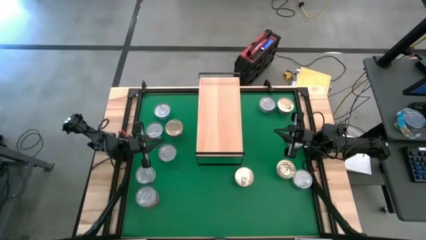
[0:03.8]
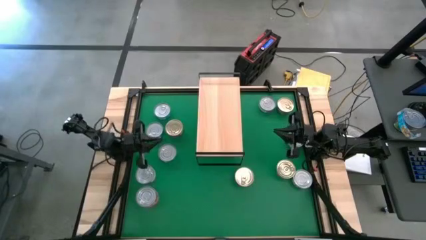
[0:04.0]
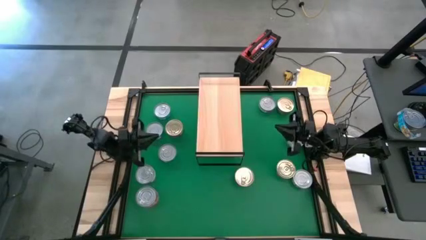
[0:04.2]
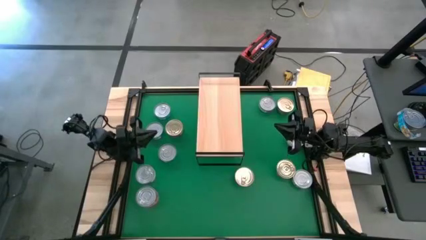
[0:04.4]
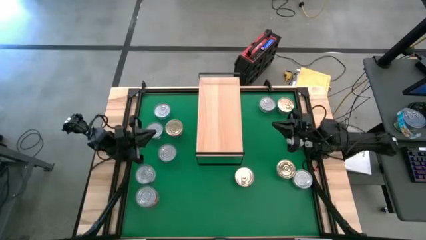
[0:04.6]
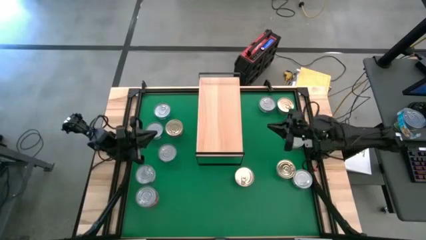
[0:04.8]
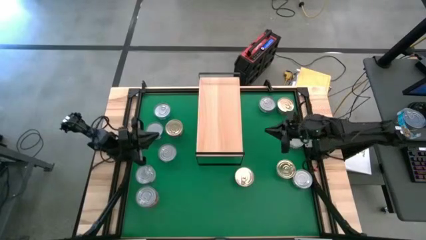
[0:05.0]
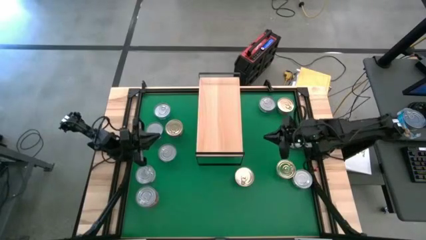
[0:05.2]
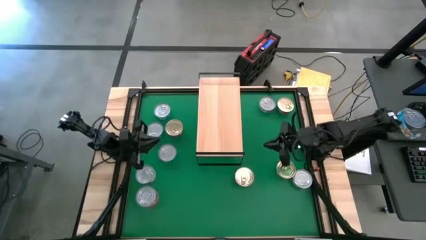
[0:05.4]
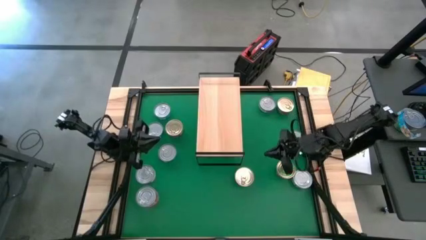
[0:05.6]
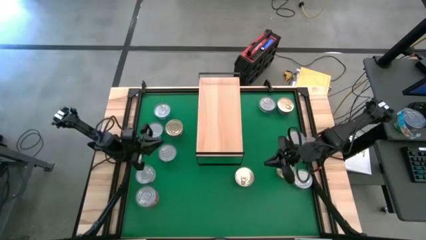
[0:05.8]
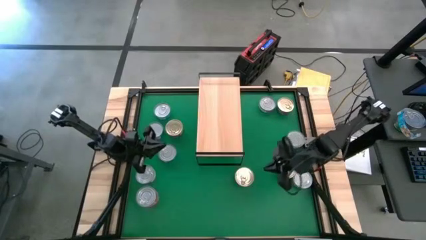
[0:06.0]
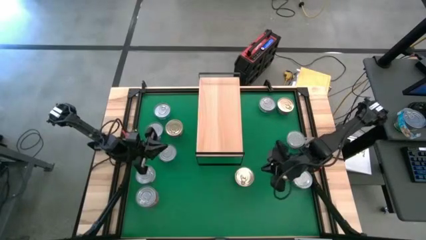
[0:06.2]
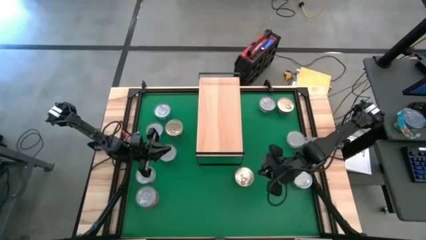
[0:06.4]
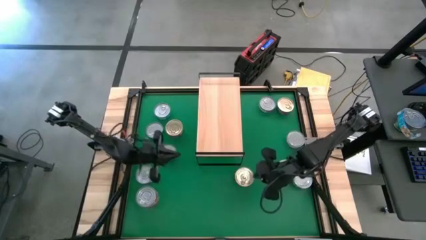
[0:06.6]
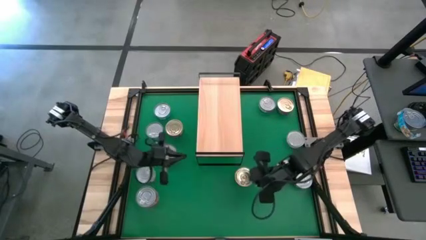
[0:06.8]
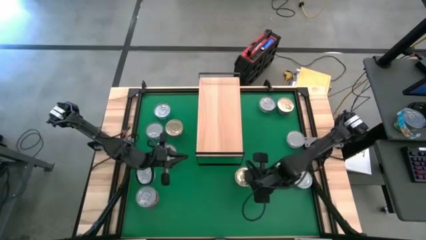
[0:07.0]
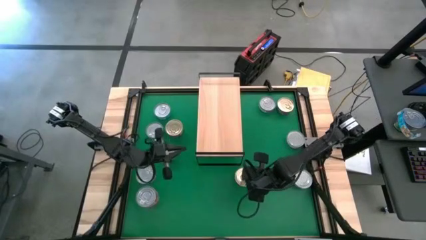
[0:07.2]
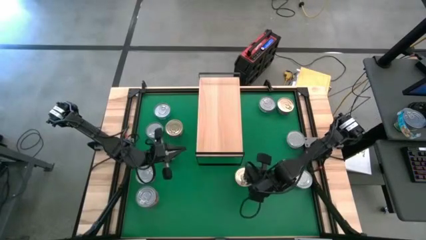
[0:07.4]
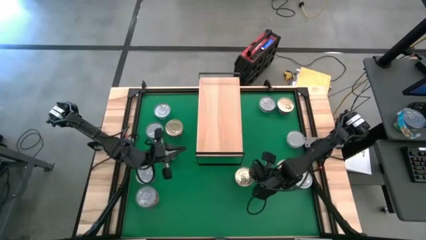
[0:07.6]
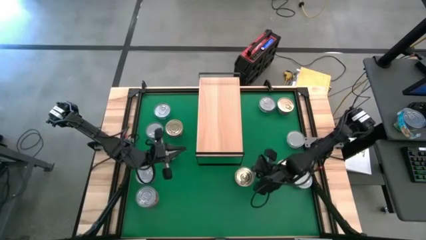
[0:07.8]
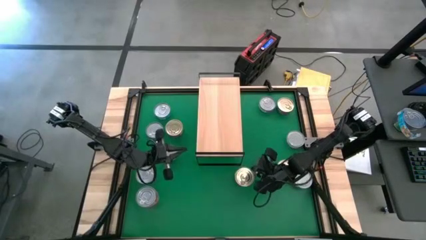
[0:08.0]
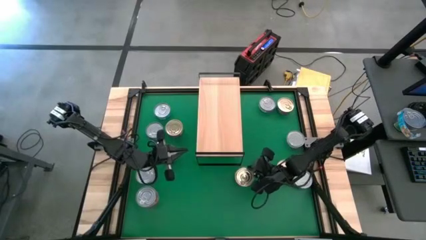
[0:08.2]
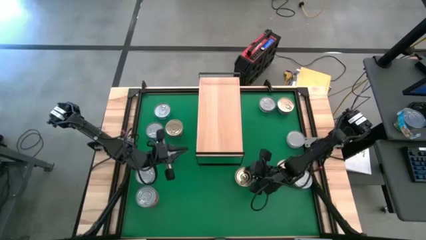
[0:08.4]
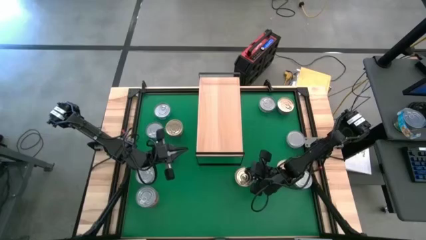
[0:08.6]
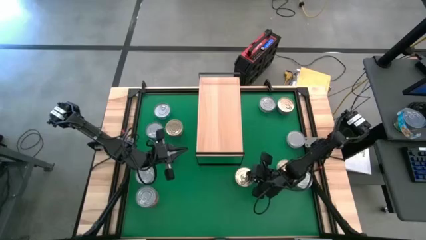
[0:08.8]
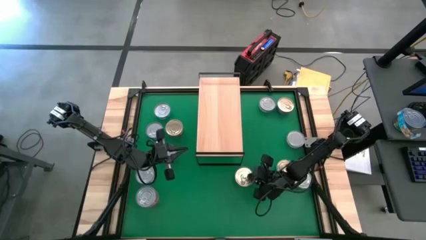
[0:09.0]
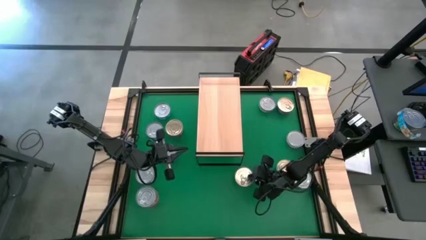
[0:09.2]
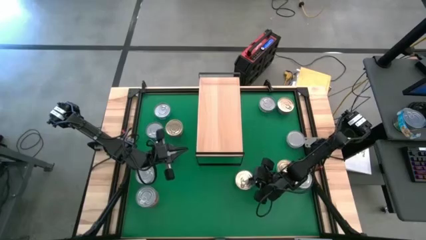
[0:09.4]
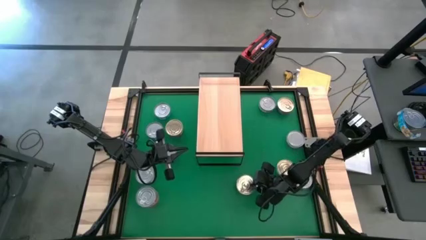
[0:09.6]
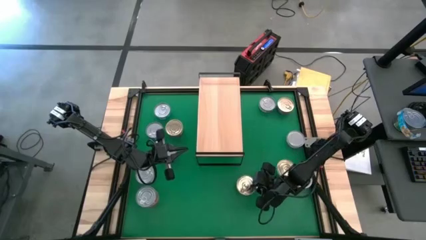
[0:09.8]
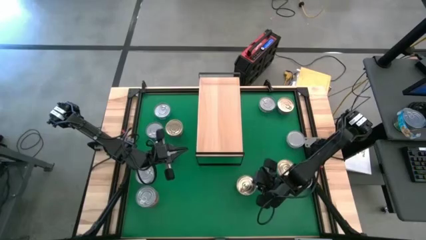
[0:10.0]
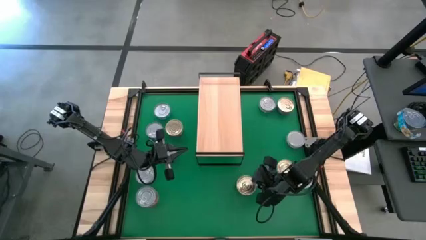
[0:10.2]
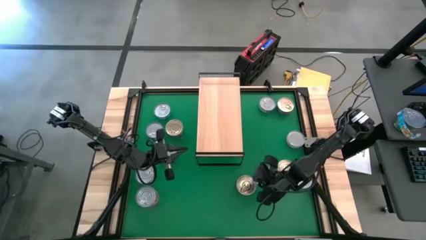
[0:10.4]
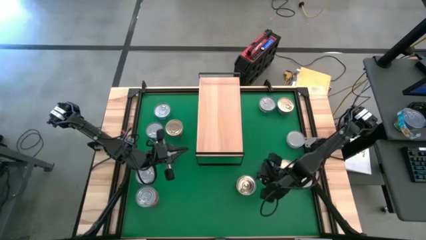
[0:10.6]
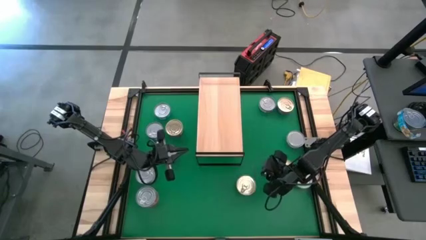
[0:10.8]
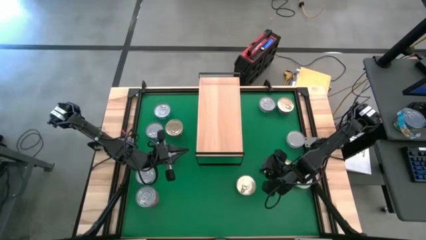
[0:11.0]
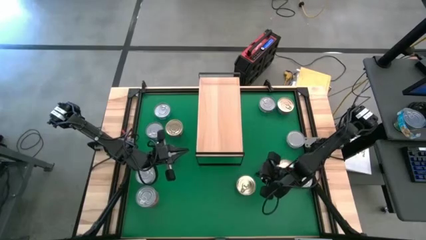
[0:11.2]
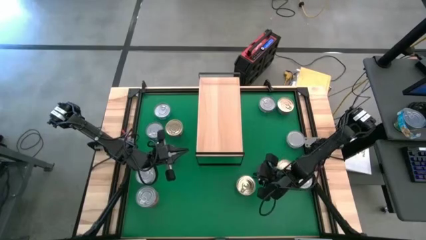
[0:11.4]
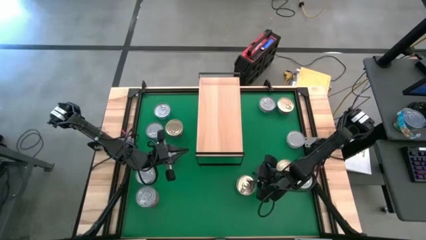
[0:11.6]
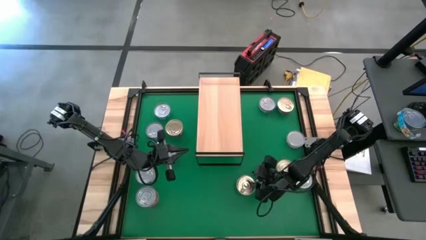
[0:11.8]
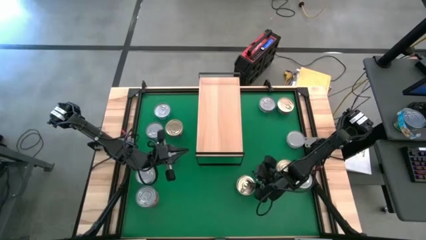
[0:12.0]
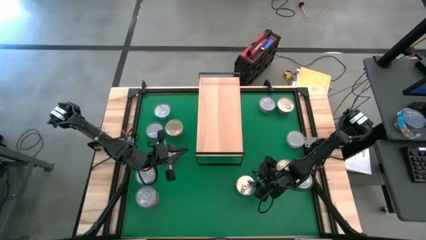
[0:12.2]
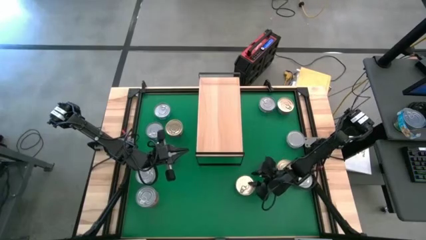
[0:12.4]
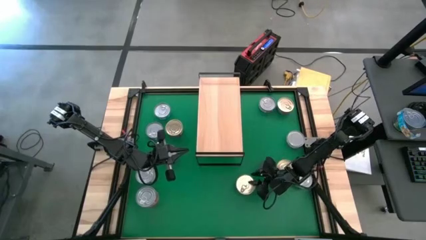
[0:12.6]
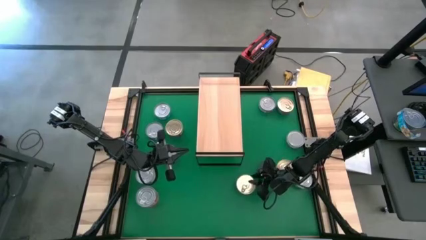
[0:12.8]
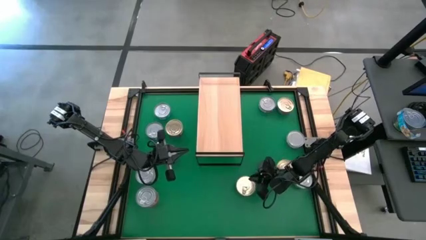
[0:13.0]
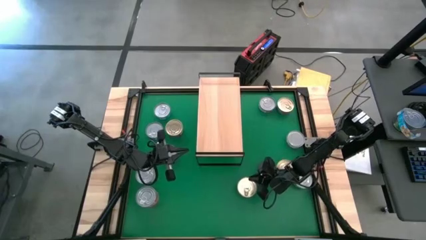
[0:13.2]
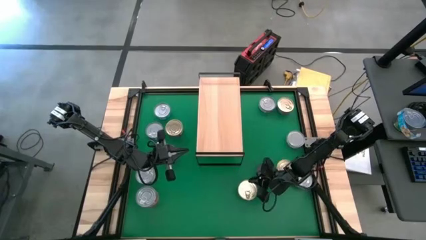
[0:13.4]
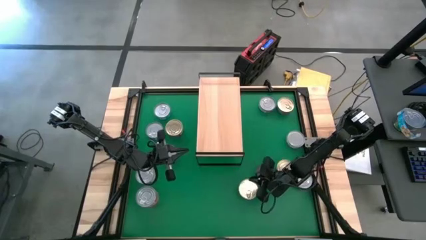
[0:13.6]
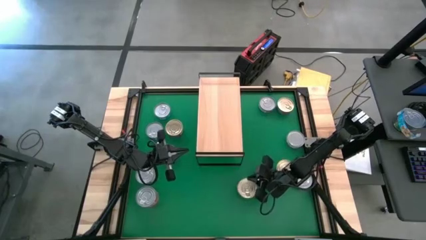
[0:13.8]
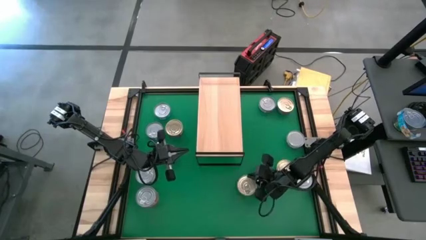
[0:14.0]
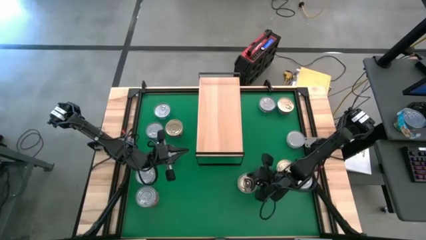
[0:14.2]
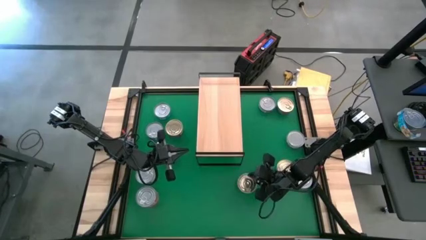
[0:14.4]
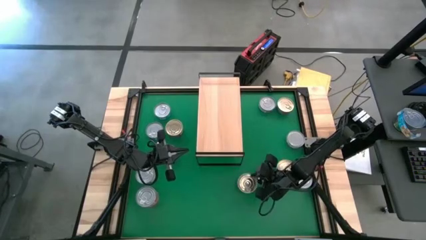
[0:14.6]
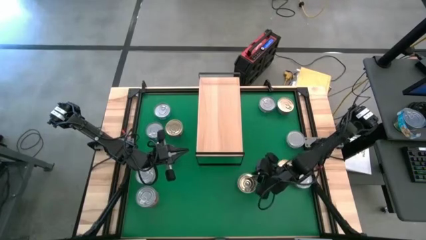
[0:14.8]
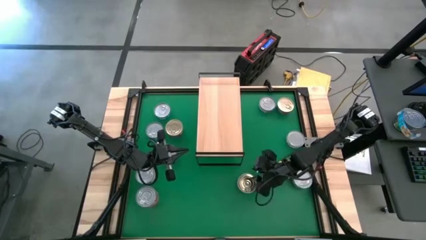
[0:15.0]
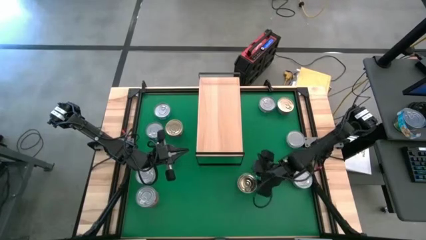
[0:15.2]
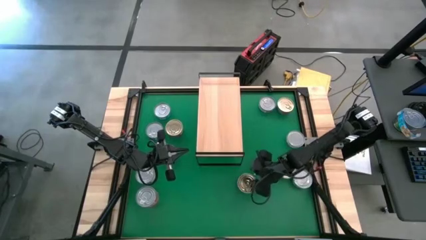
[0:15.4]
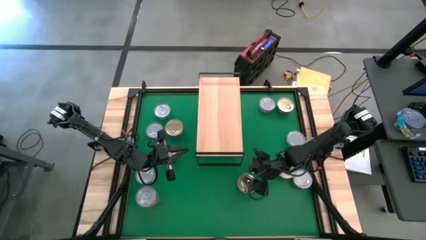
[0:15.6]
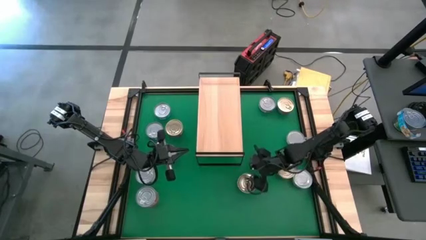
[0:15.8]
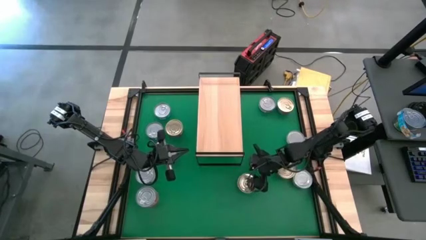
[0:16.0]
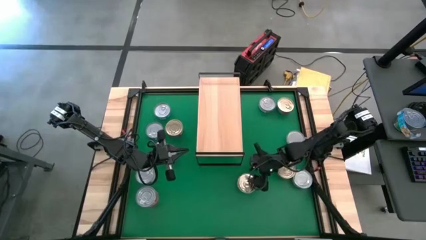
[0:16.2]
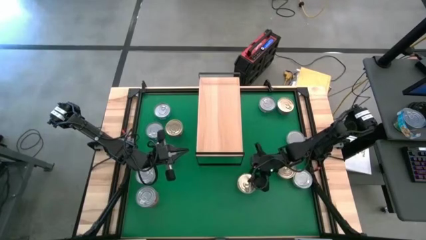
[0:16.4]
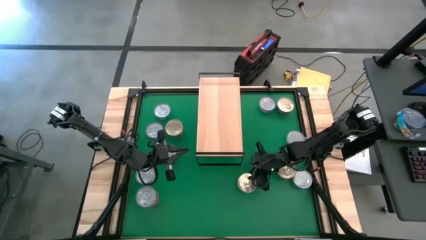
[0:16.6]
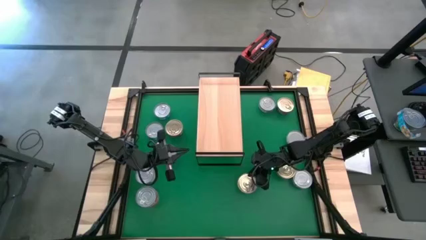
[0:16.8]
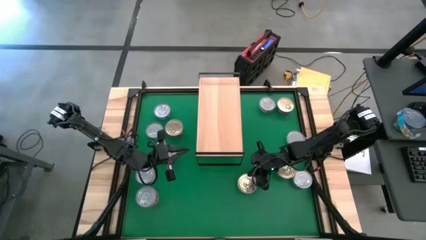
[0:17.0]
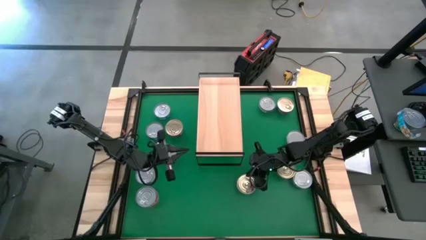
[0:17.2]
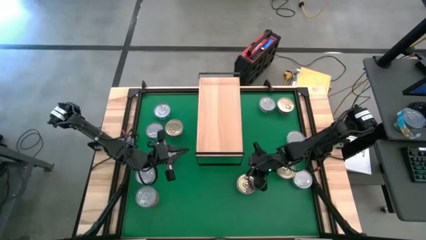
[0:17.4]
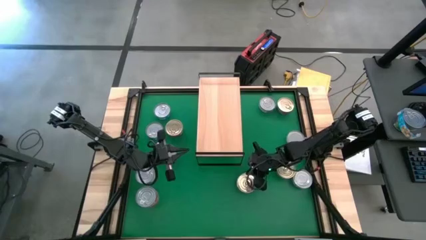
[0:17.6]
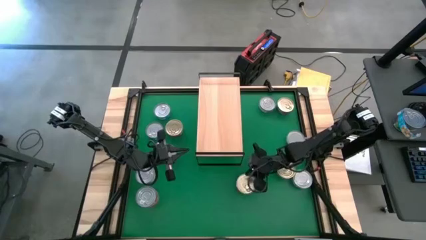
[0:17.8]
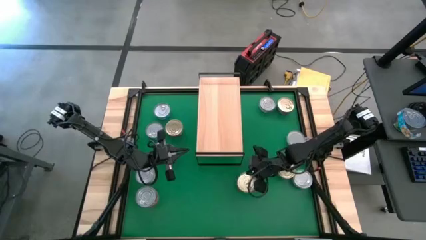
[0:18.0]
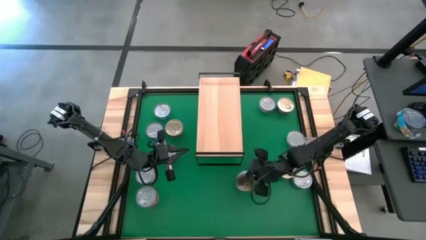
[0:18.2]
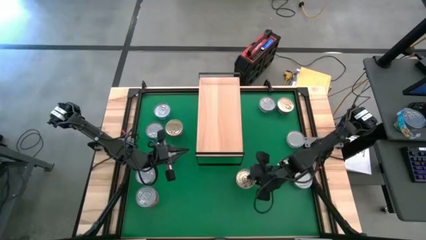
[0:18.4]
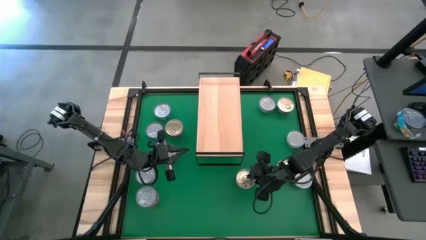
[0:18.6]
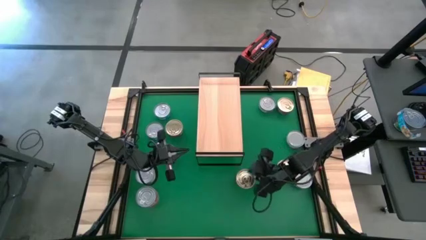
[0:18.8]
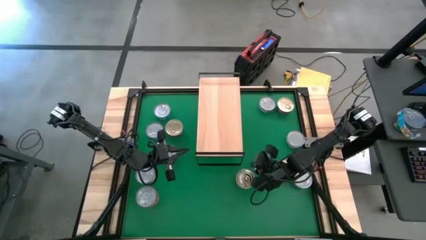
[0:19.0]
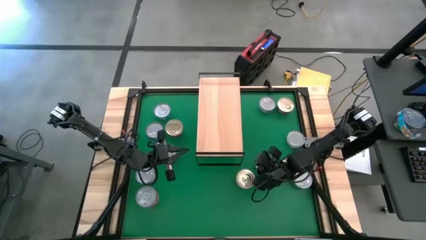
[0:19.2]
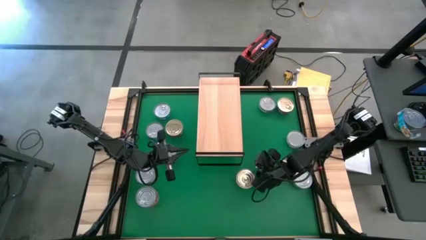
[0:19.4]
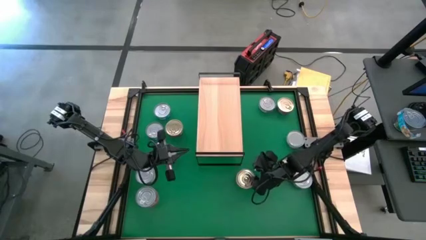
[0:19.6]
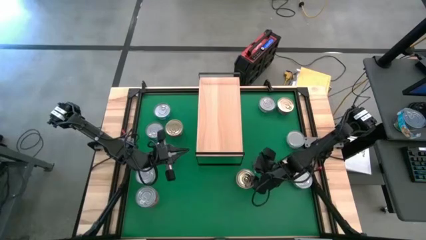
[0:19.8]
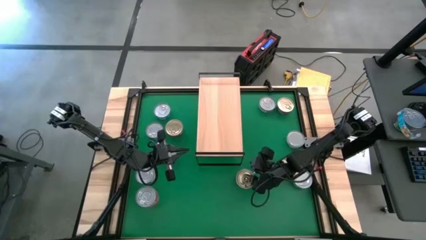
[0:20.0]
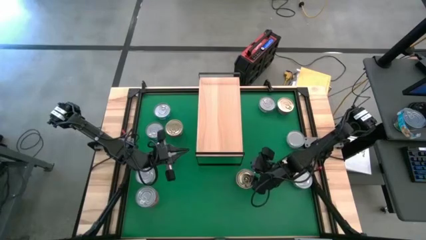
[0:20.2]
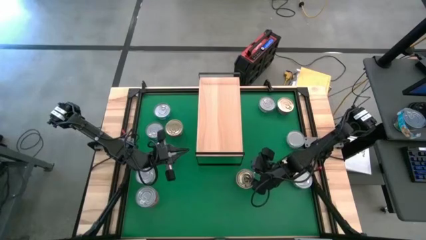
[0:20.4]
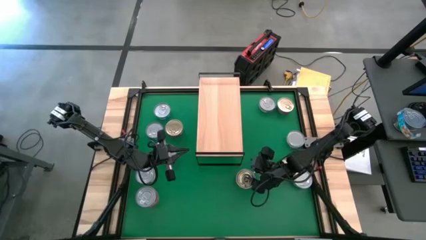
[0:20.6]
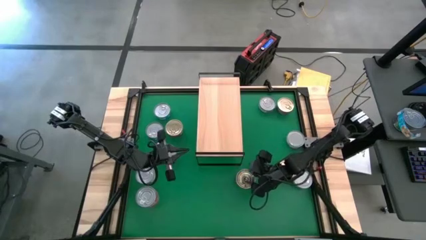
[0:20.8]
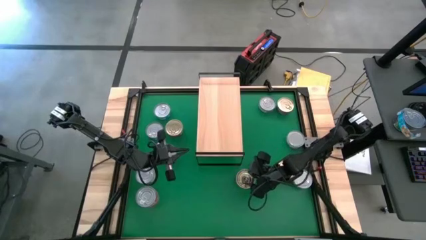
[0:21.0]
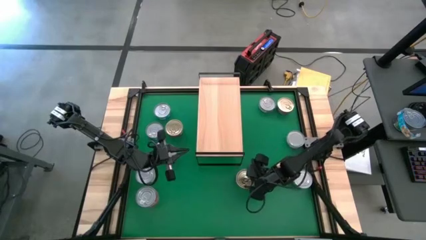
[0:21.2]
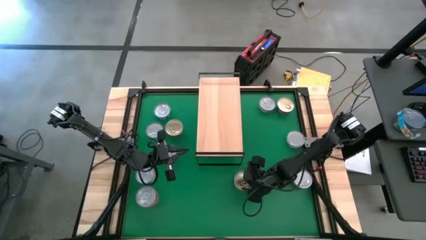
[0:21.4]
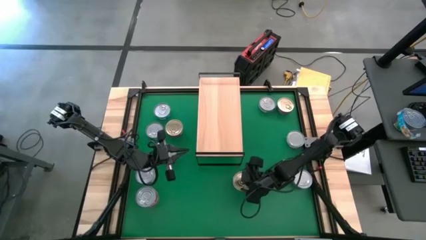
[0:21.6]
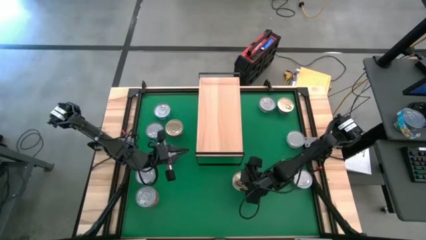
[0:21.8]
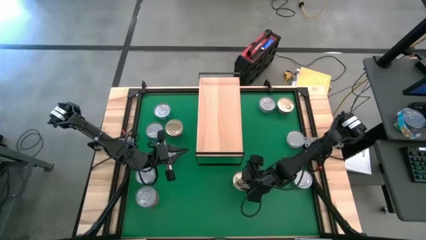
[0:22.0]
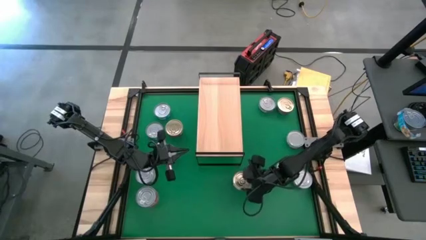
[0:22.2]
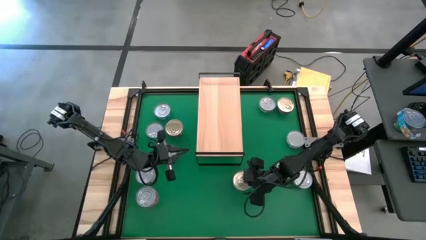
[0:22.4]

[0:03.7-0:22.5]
Task: Stack canned seafood by type on shelf
Put the bottom center dark blue tuna can on the shelf
